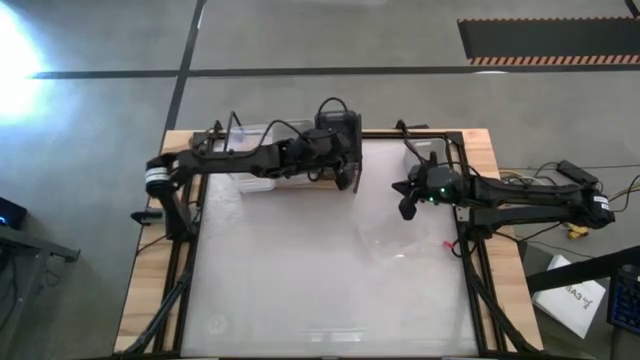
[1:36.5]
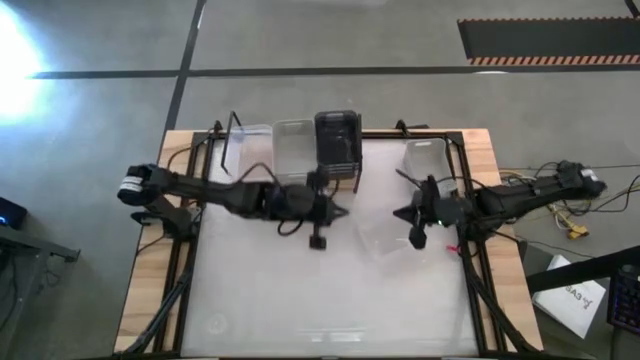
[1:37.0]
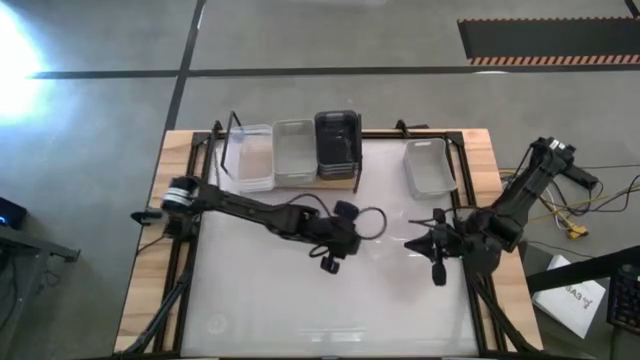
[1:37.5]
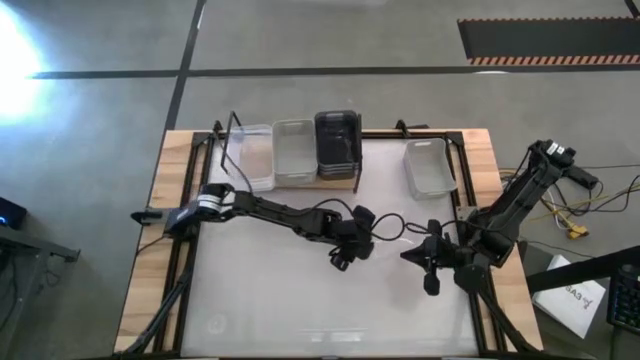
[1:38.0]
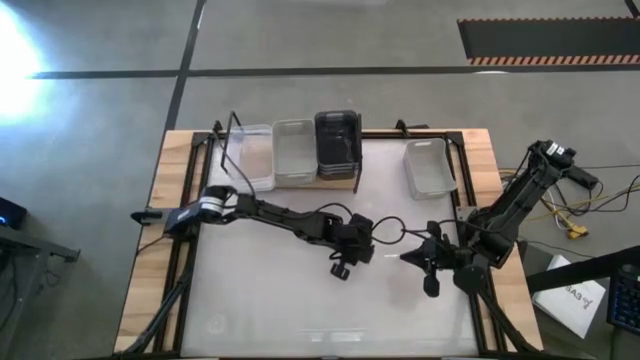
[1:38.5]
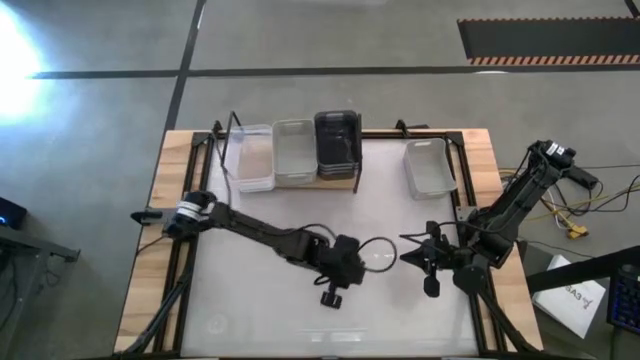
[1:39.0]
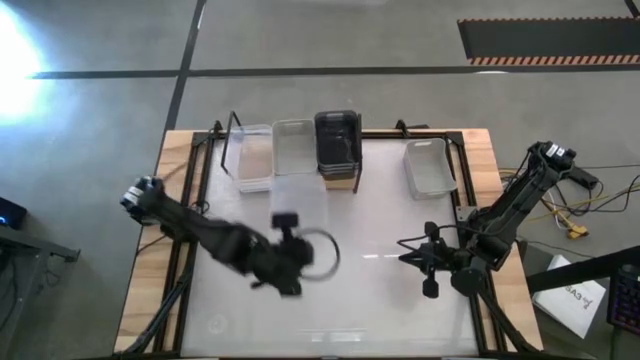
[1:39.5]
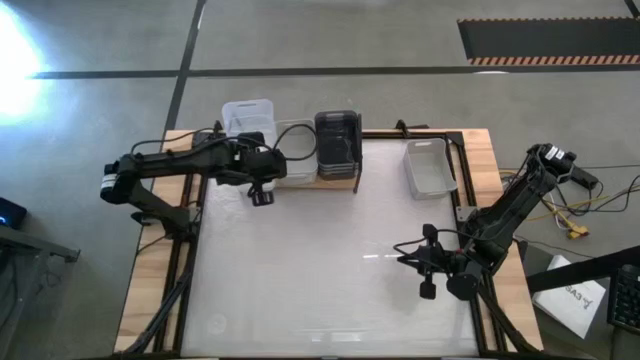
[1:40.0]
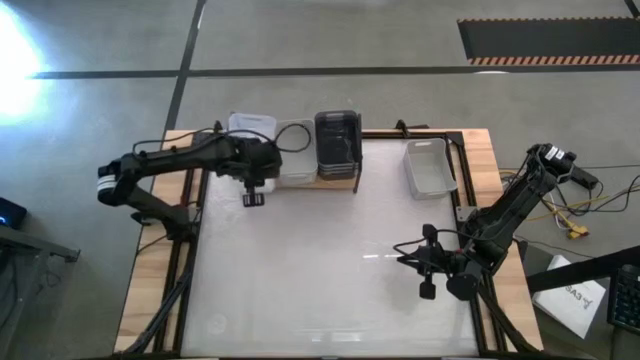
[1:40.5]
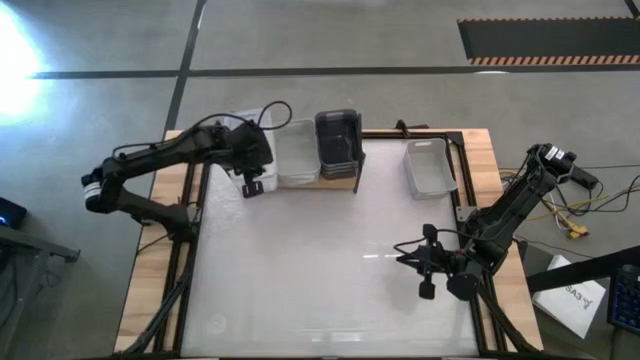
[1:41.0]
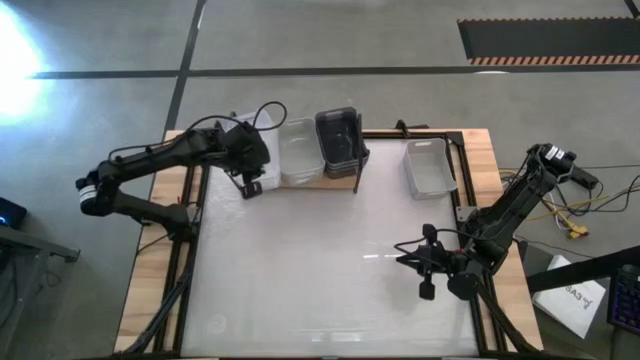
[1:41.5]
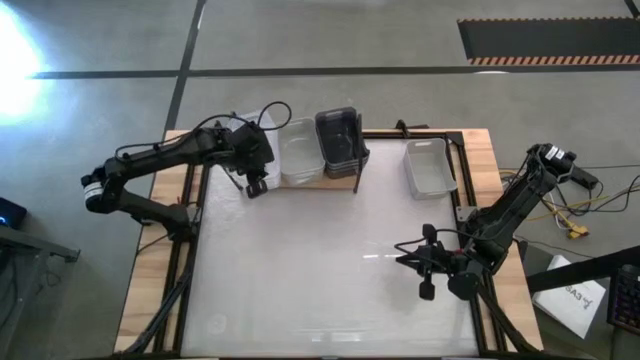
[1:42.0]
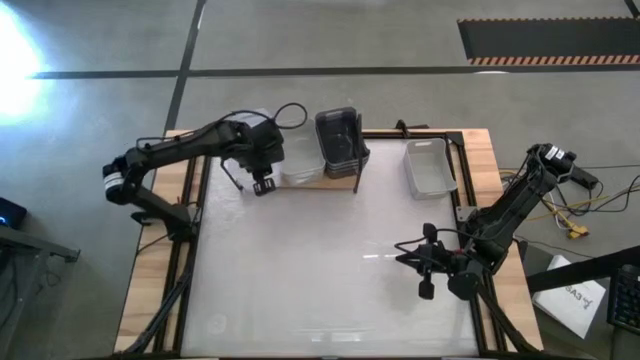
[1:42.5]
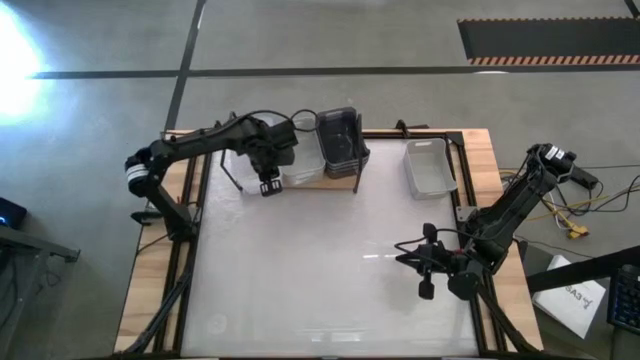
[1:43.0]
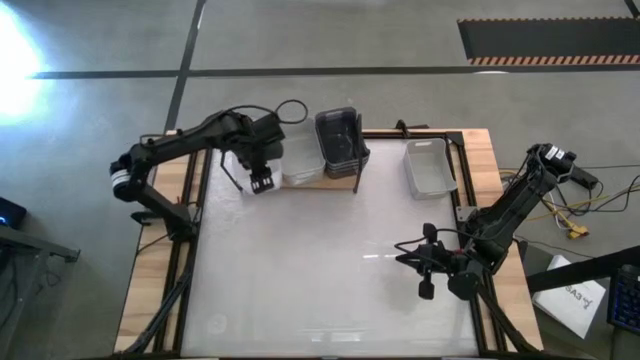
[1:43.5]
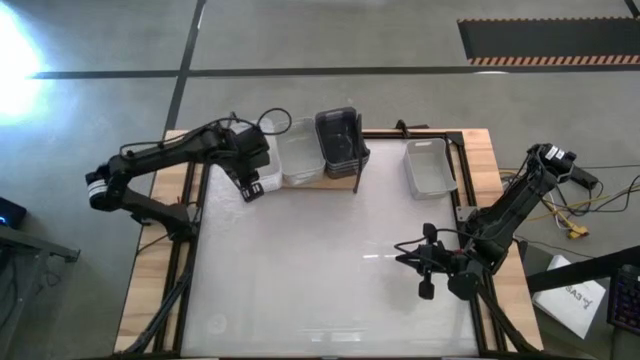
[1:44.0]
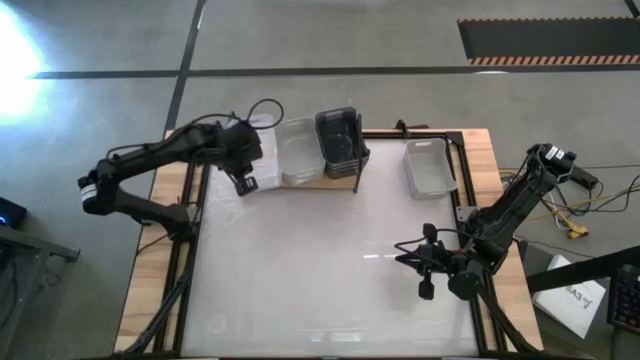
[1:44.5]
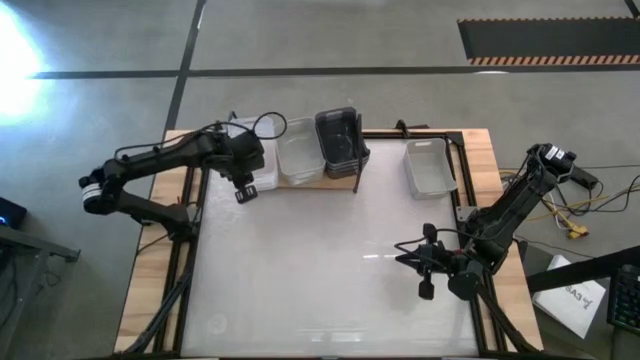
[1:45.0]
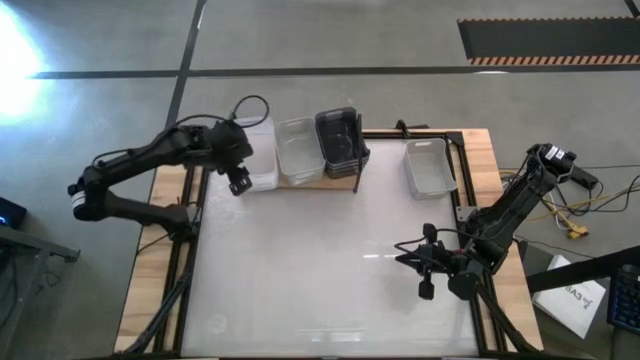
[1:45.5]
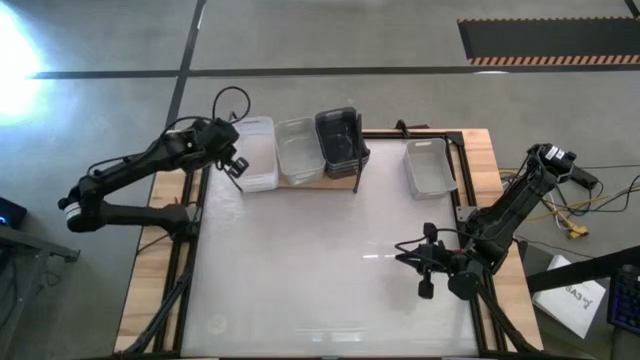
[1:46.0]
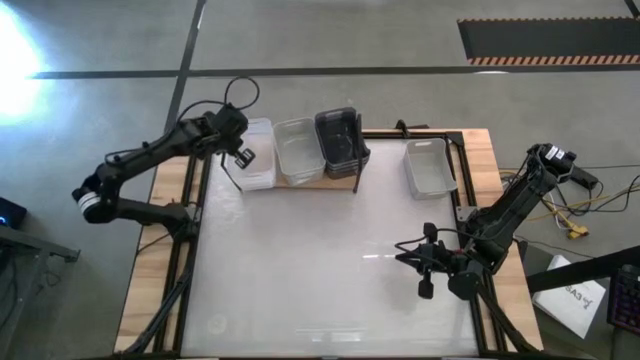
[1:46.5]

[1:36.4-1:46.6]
Task: Stack baskets on shelf by color
Stack the transparent bin on top of the transparent bin on the shelf

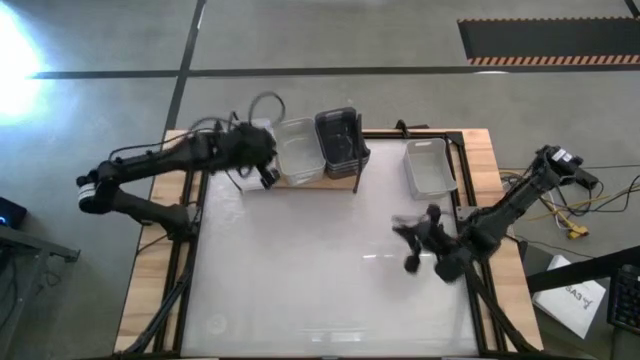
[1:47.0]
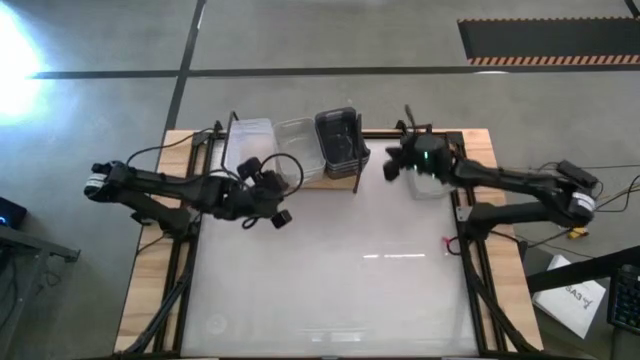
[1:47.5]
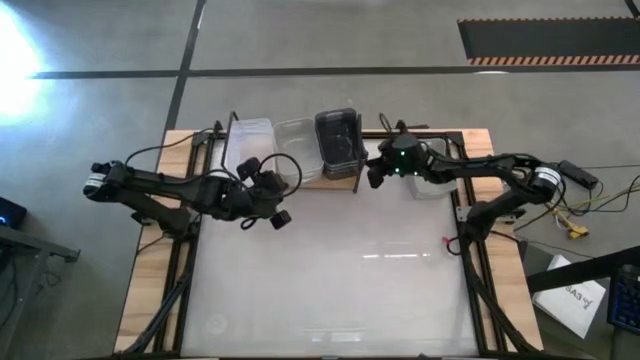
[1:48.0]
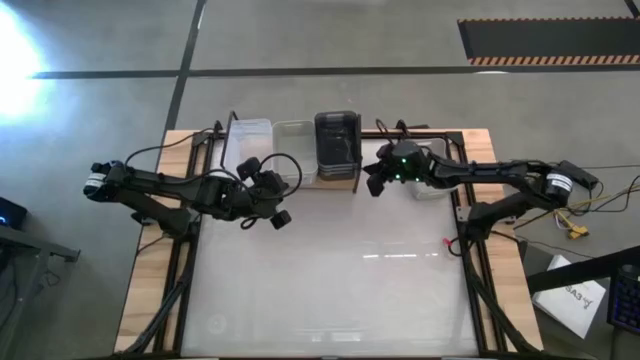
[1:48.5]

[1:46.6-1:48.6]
Adjust the stacked black bins on the shelf

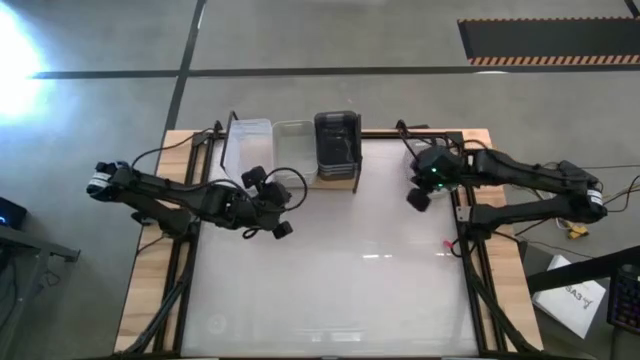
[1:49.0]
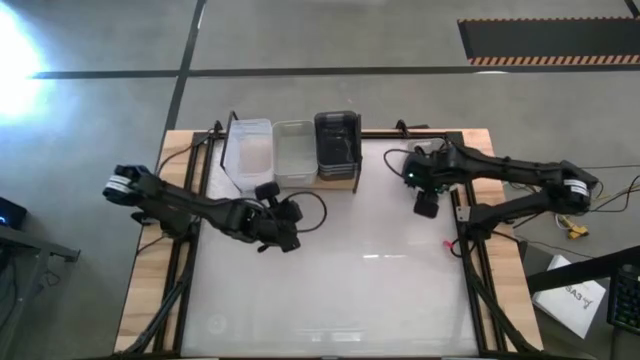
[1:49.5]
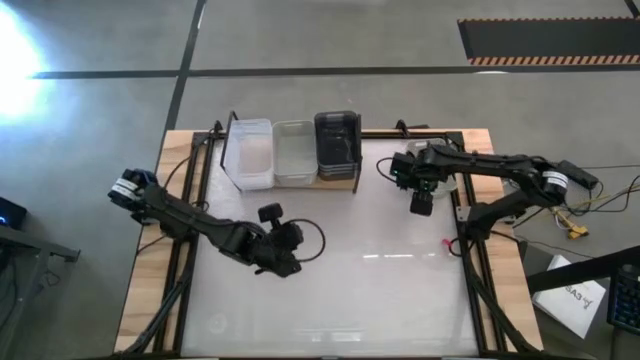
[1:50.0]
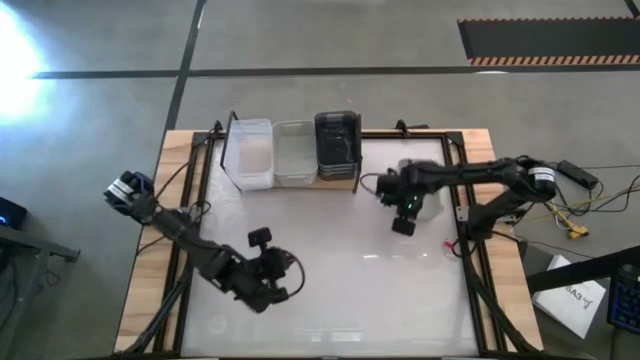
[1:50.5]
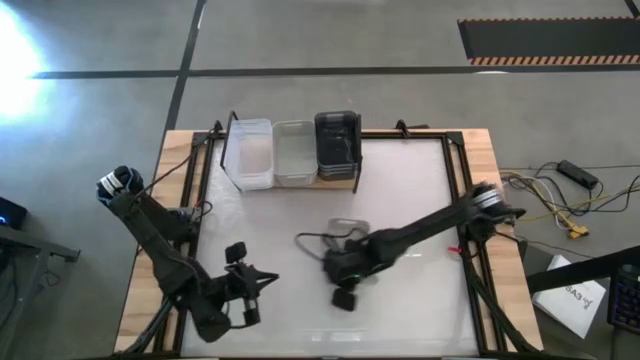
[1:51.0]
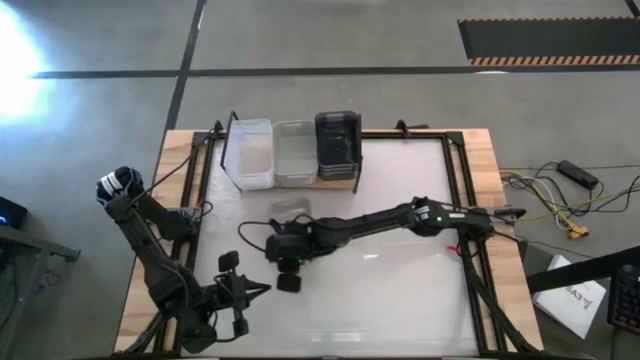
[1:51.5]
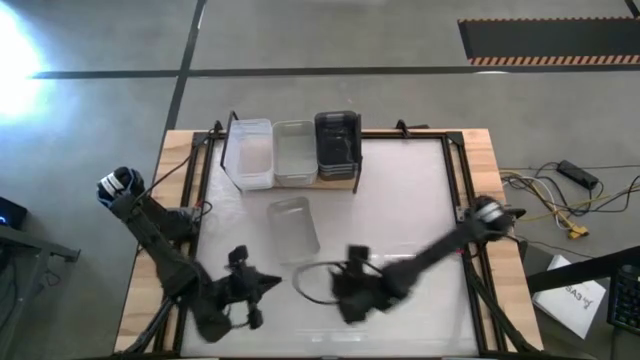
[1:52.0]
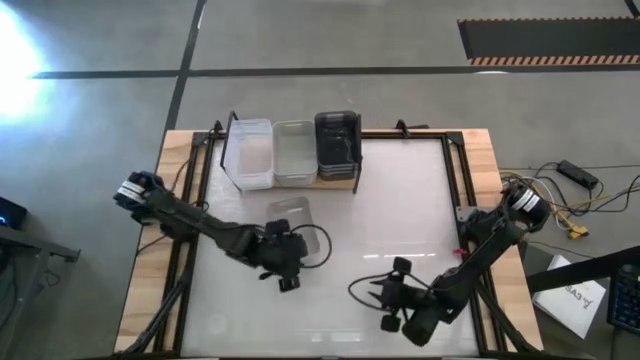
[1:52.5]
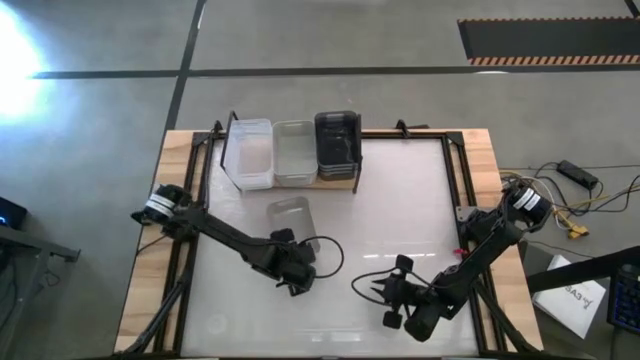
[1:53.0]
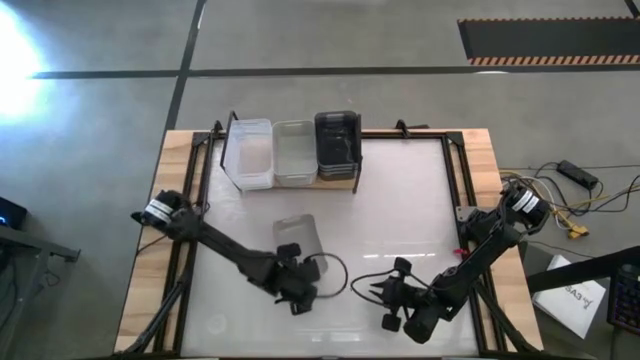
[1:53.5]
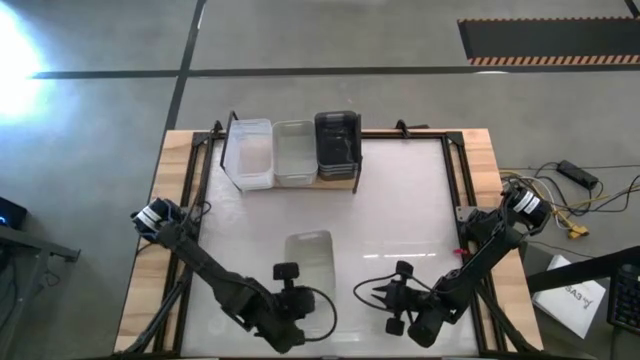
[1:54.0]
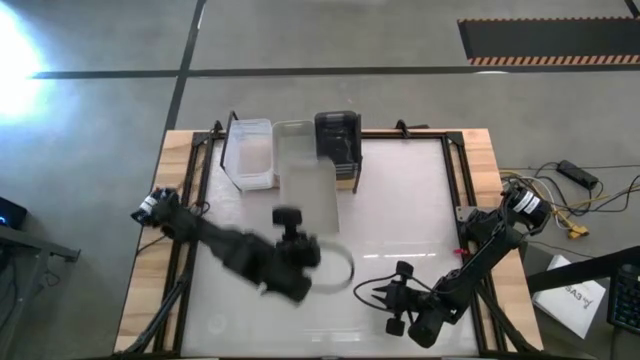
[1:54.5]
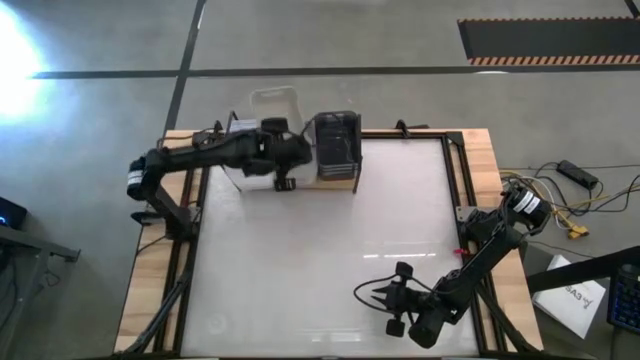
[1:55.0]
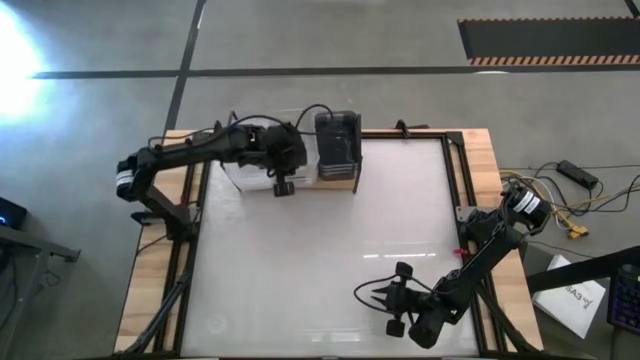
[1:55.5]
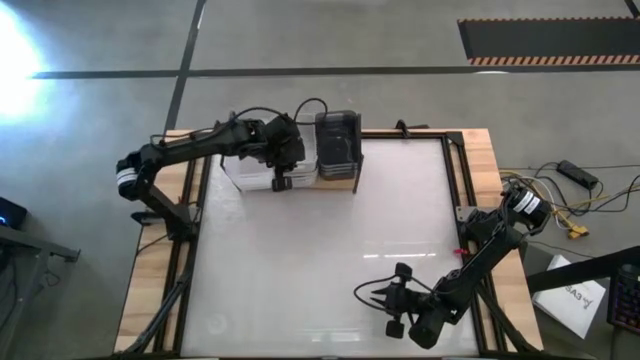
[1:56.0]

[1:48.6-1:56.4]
Stack the gray bin on top of the gray bin on the shelf

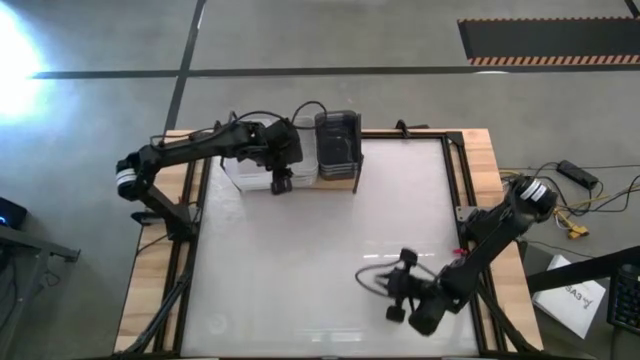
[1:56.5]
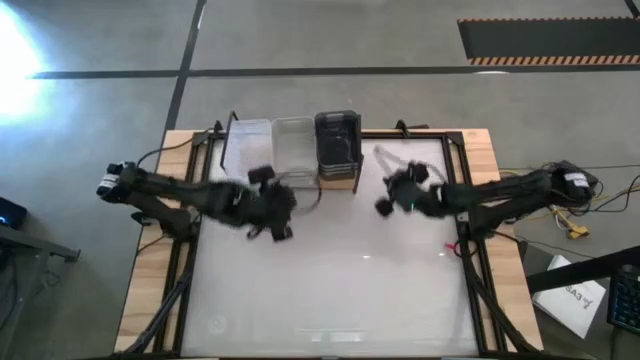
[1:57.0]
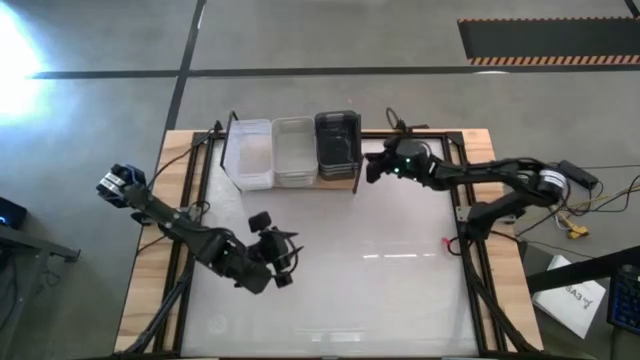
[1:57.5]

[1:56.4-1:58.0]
Adjust the stacked black bins on the shelf
